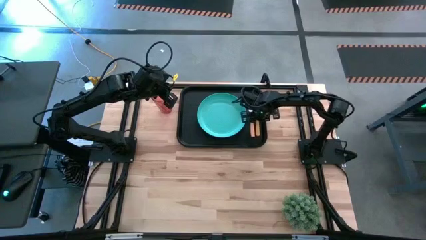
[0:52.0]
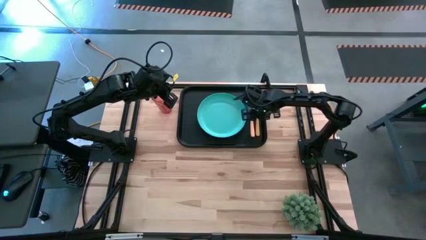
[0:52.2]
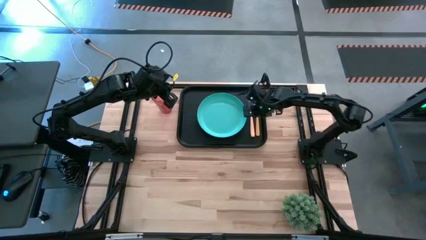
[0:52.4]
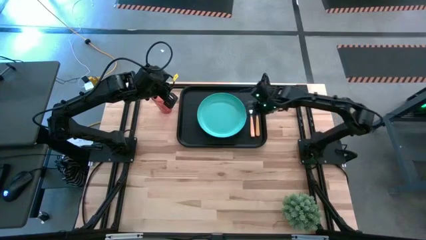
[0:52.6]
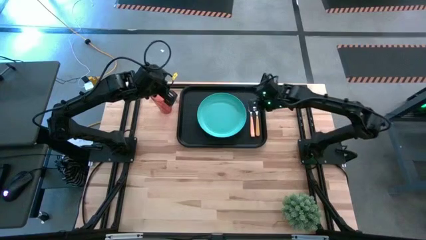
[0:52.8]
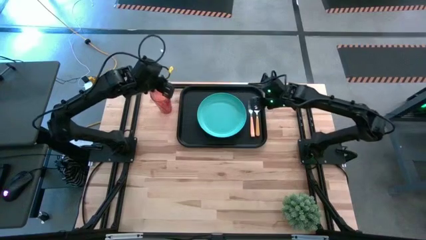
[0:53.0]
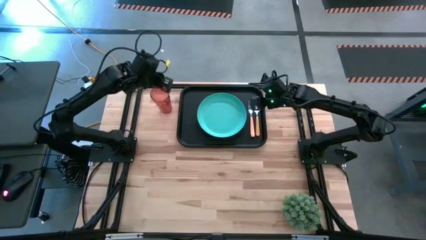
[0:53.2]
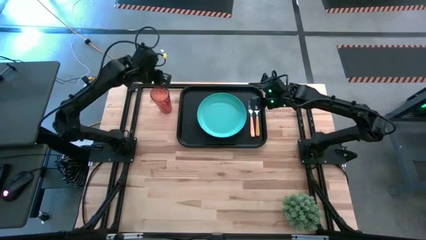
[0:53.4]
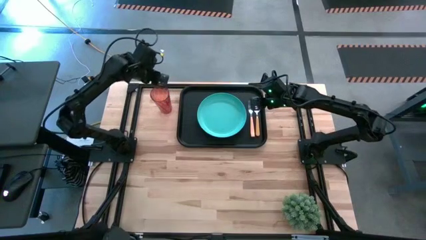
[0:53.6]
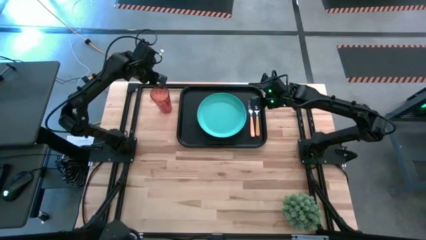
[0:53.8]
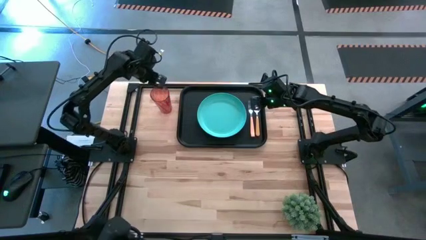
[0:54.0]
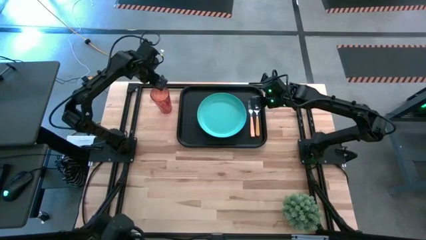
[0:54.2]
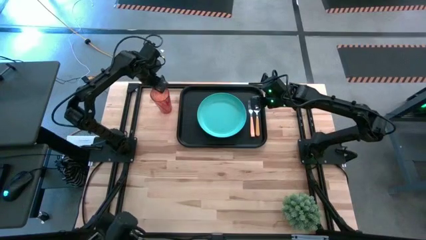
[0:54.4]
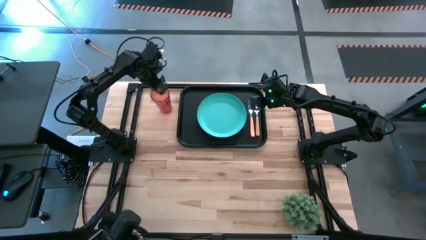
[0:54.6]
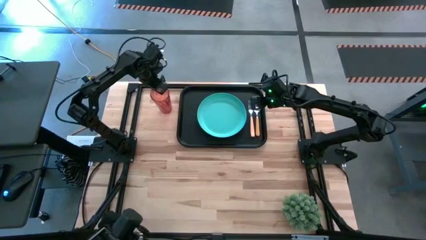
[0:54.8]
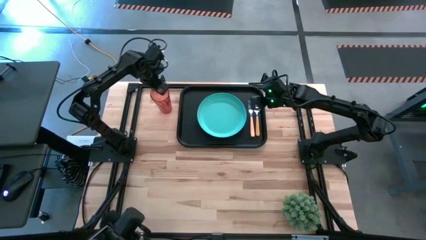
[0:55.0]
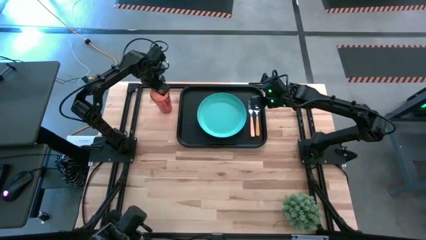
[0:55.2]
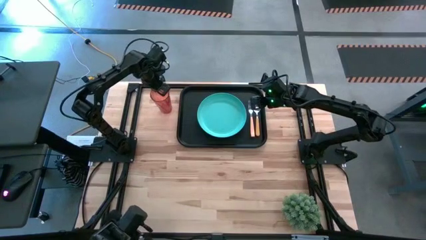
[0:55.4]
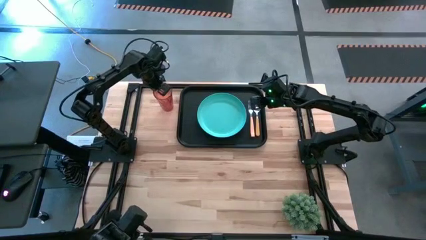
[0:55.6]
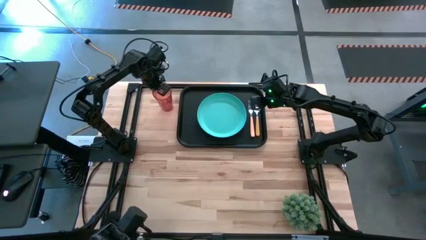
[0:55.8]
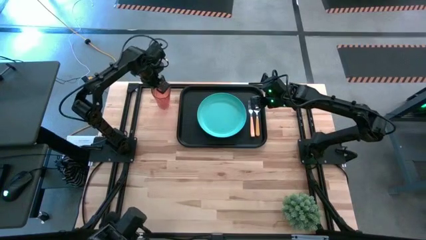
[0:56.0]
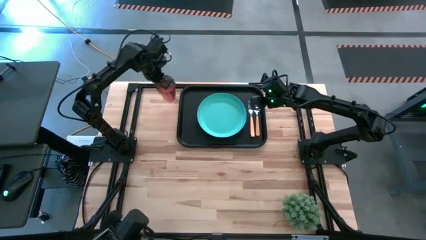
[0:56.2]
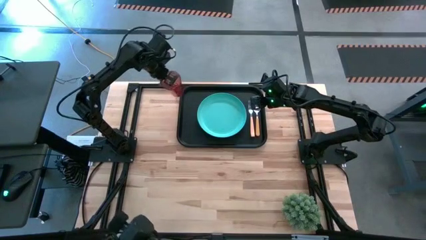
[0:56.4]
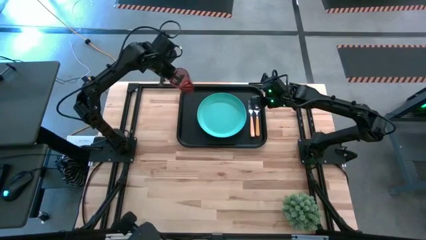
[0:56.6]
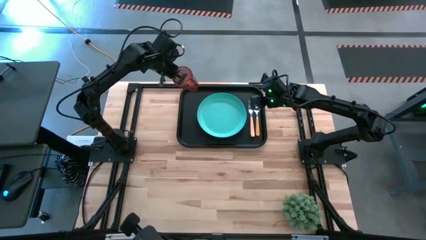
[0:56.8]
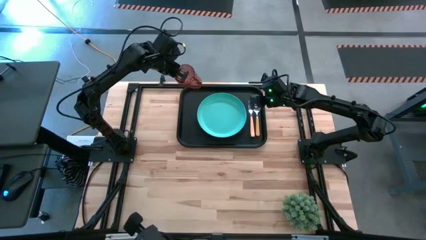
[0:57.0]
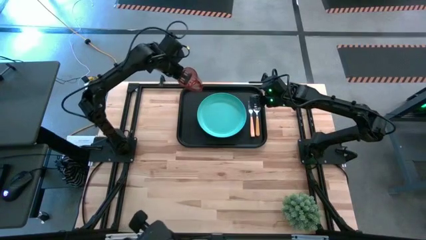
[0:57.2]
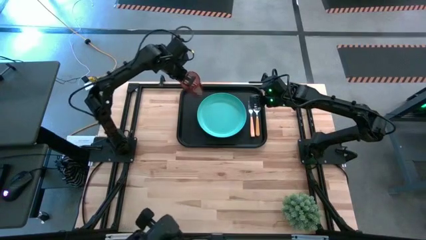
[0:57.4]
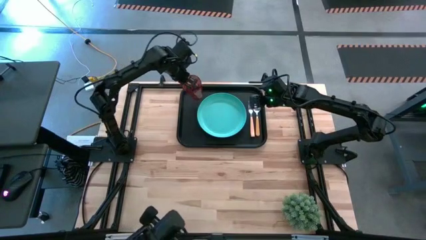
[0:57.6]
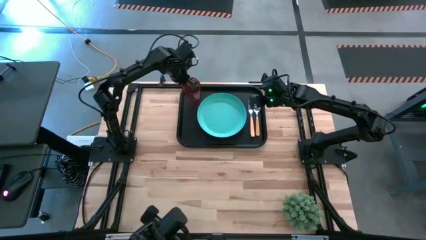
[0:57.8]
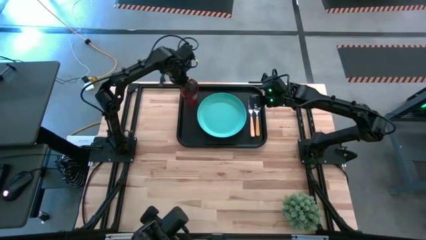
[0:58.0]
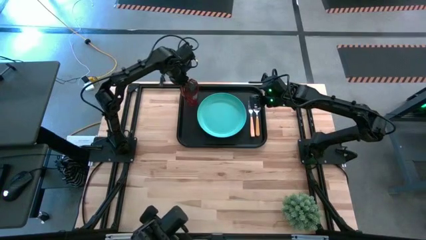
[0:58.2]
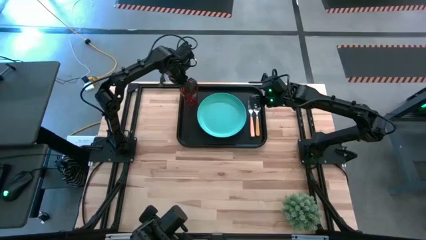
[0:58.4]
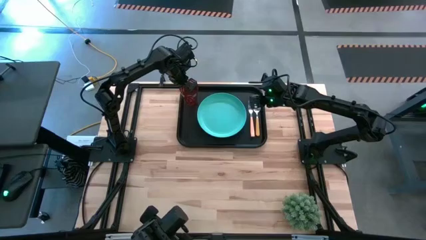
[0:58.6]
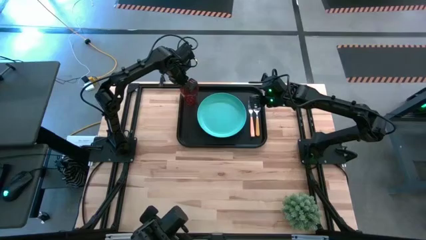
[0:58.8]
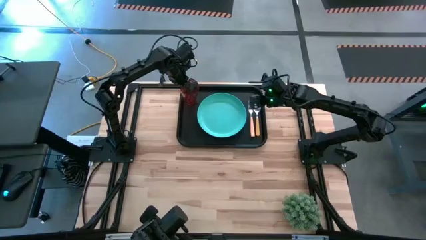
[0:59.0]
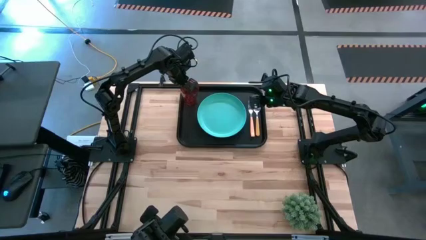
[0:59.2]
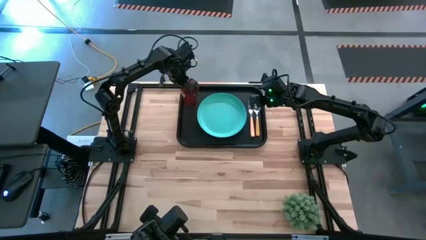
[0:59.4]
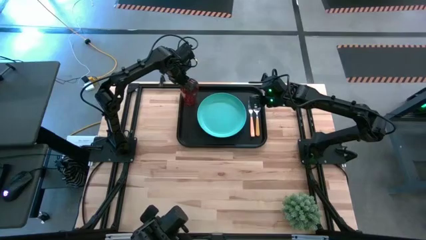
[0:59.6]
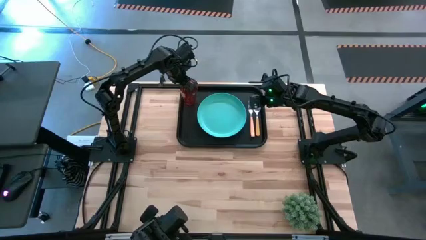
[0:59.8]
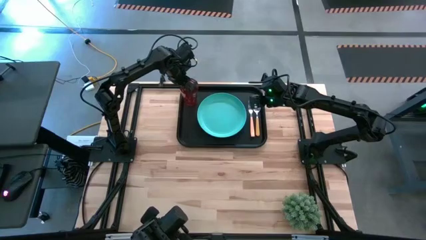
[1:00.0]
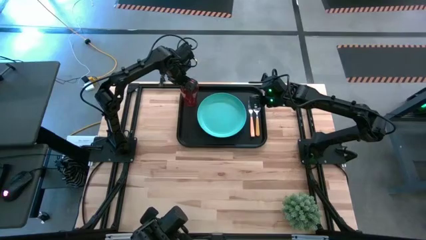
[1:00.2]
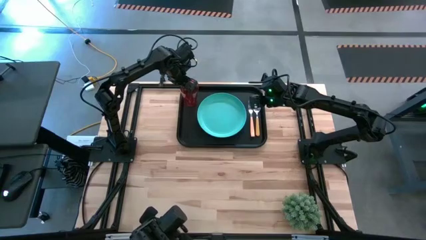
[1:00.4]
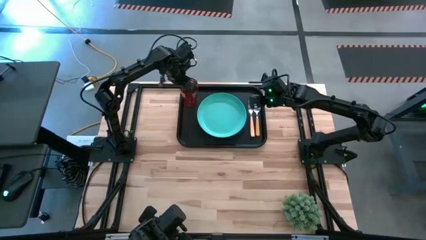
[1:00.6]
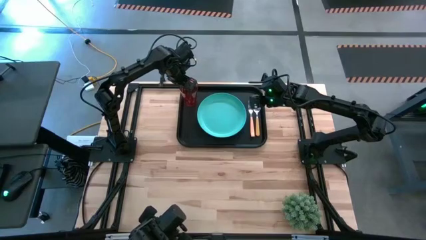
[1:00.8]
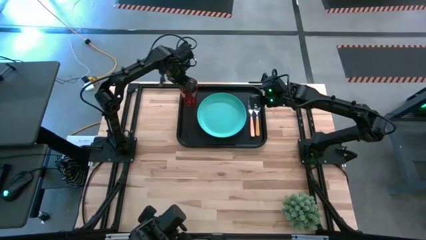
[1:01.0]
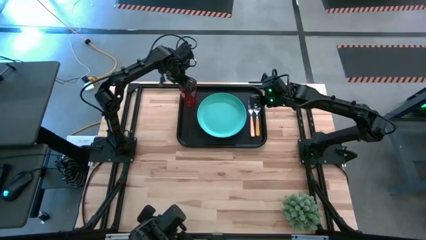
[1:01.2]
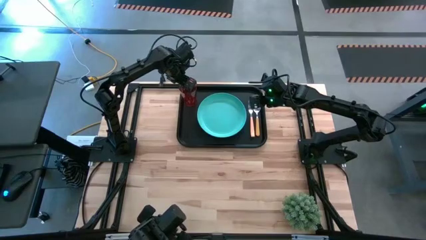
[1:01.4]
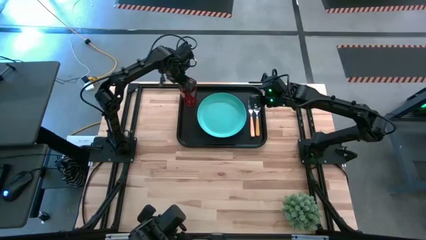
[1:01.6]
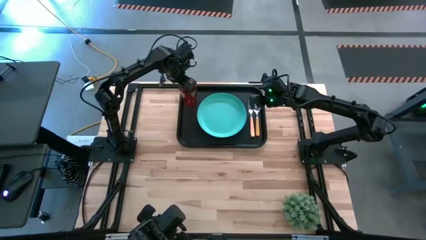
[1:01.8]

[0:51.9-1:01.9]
Task: Pick and place plate/cup/fork/spoon on tray
Put the red cup on the black serving tray to the top left of the blue plate

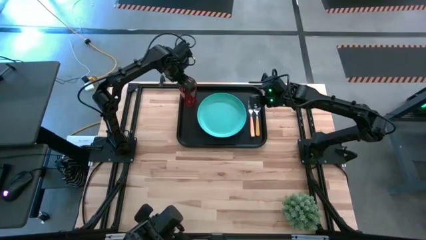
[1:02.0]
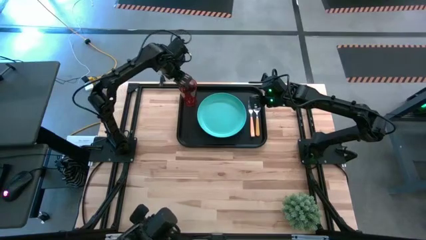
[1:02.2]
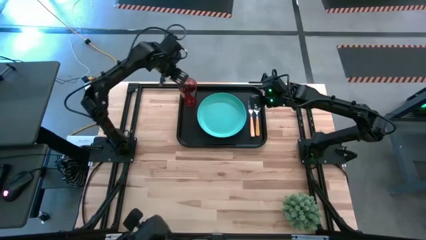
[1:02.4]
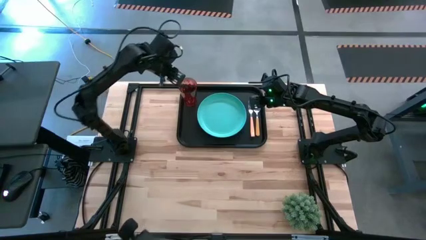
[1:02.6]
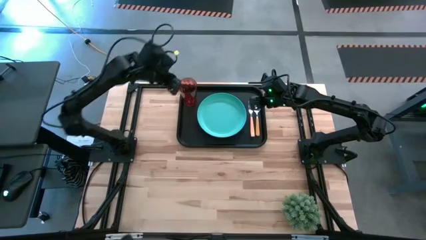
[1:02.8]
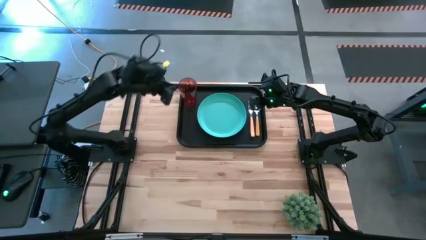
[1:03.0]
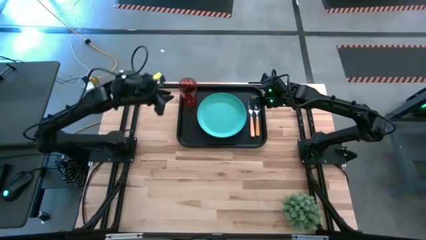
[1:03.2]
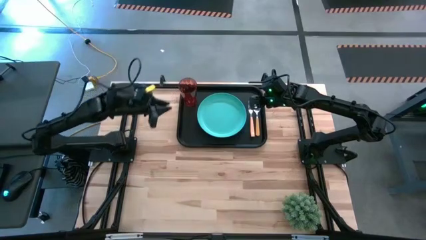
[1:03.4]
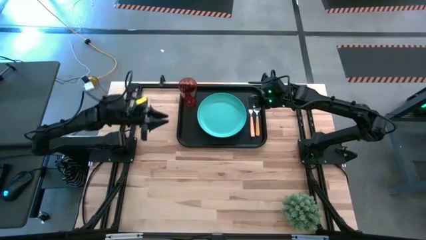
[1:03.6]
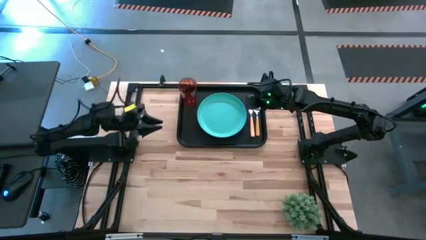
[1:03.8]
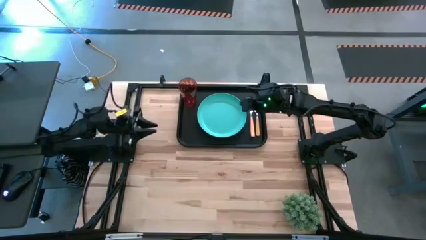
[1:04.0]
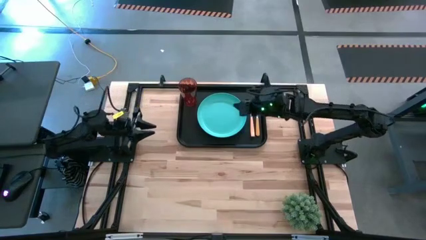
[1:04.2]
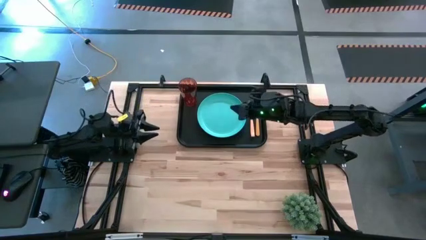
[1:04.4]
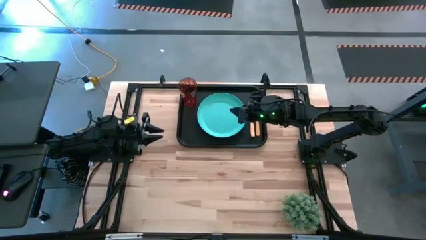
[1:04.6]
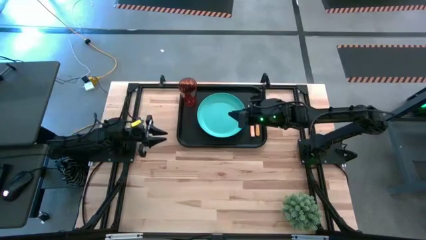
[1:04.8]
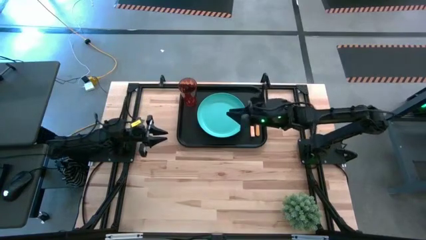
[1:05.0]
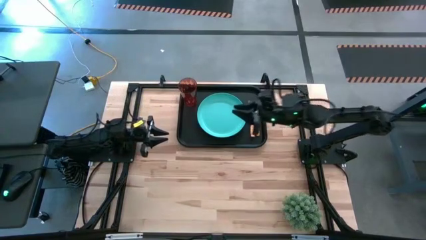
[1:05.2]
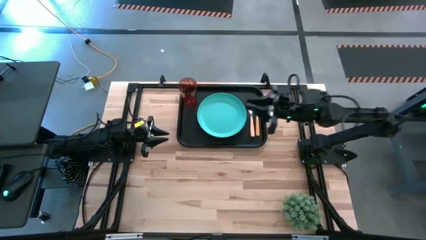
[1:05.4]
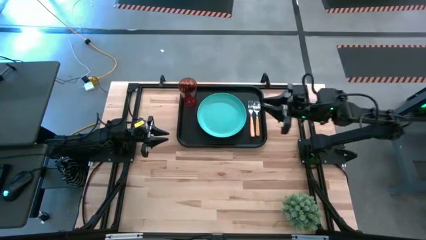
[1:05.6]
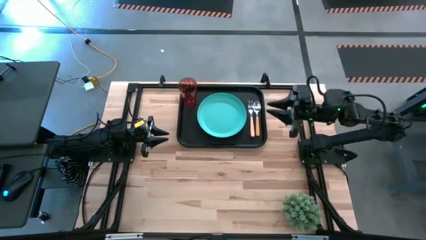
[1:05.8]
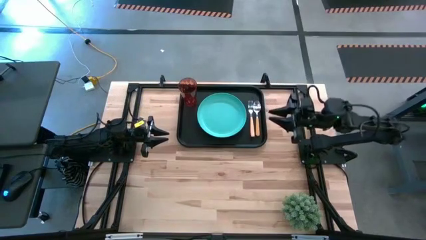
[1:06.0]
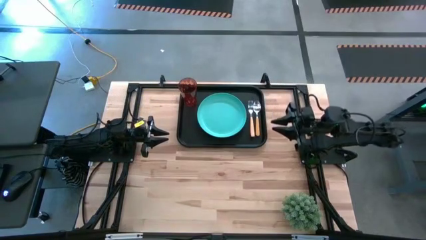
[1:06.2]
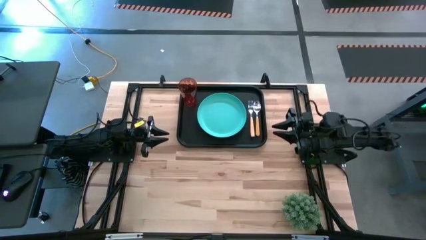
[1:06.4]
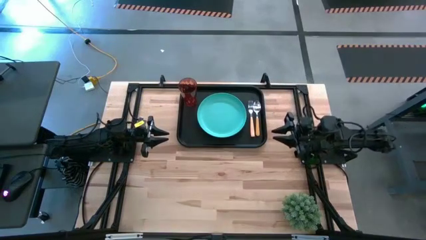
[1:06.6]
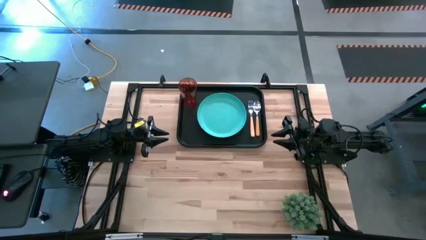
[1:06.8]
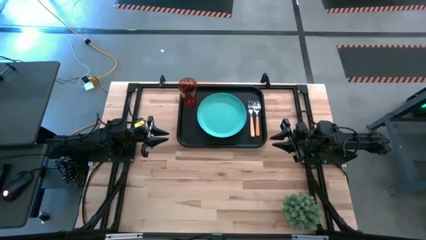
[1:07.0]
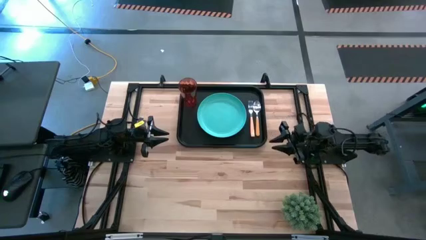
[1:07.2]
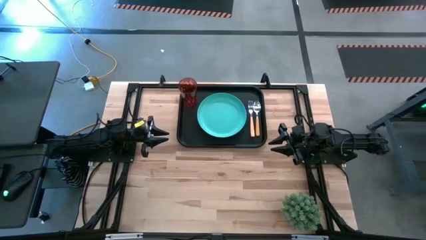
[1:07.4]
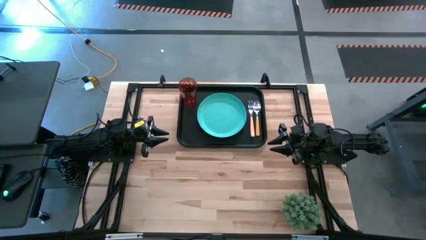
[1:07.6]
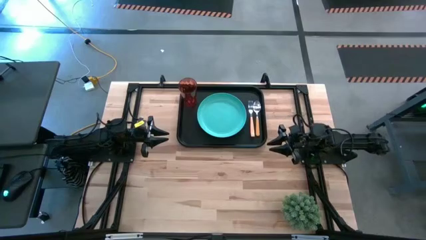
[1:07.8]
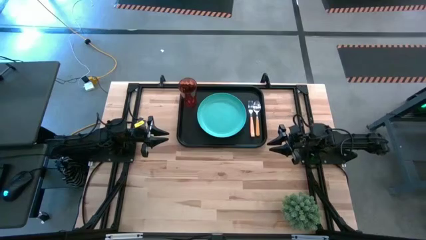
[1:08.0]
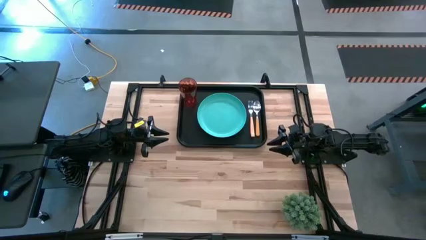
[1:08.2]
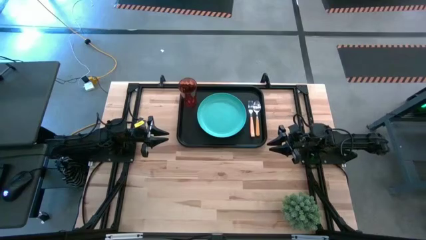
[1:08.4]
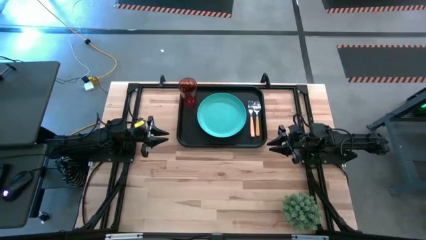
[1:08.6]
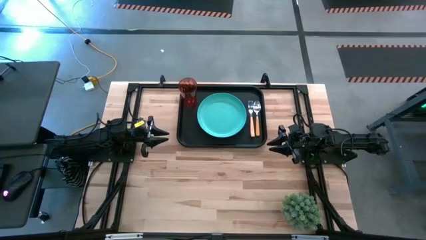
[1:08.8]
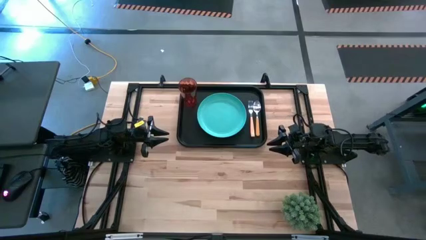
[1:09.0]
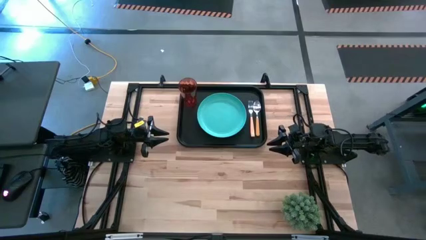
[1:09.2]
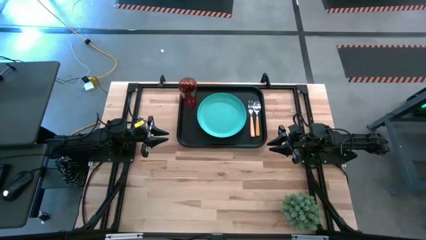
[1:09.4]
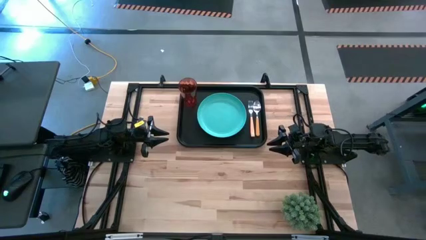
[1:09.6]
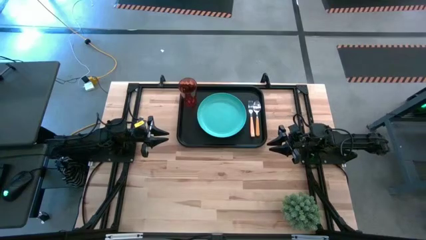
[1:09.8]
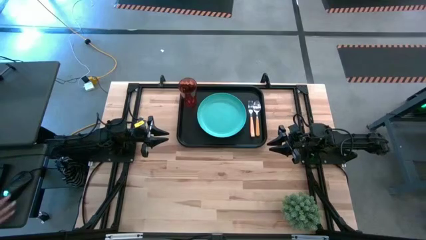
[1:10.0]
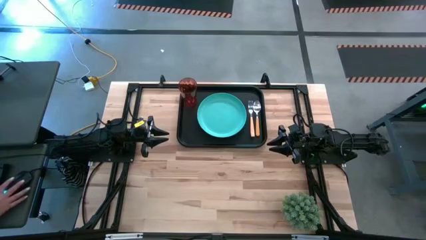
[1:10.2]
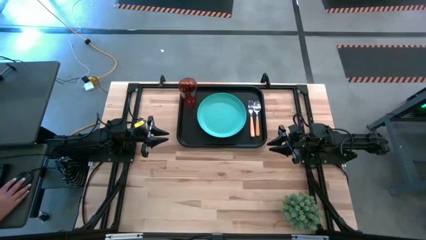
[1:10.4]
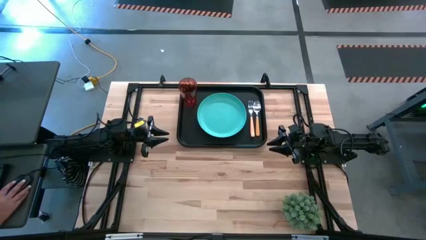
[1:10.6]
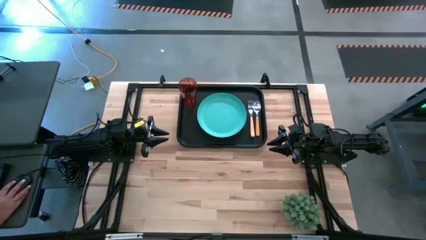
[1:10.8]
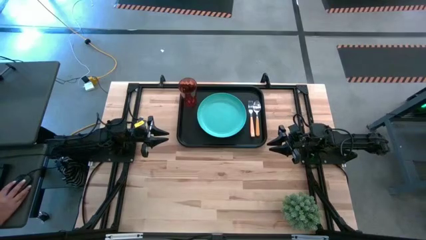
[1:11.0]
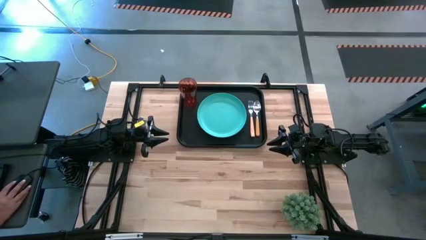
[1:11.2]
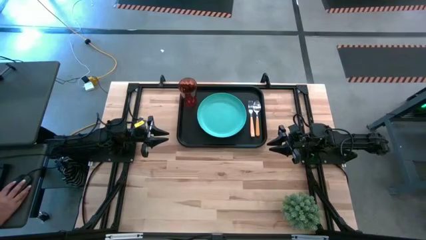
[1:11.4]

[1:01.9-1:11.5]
Return to Home Position
